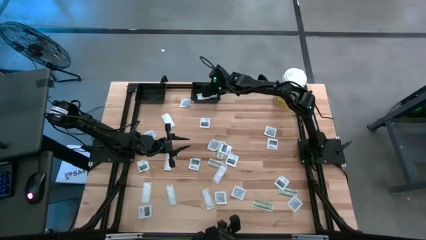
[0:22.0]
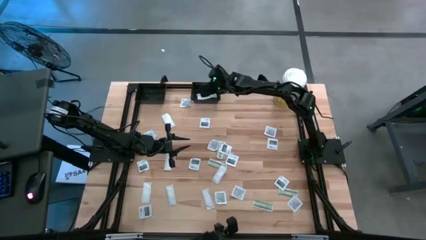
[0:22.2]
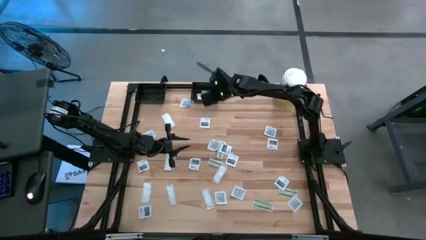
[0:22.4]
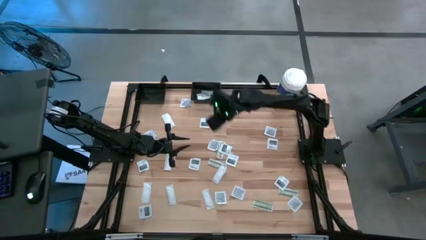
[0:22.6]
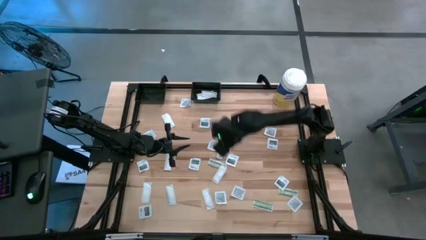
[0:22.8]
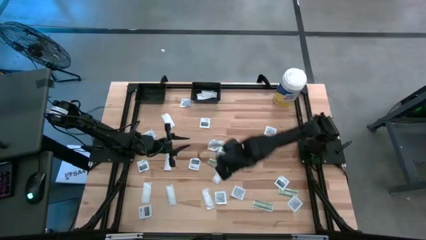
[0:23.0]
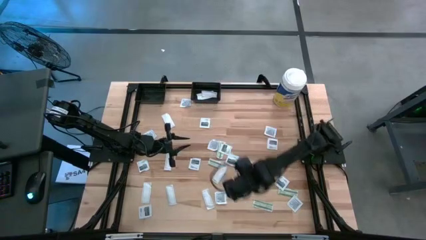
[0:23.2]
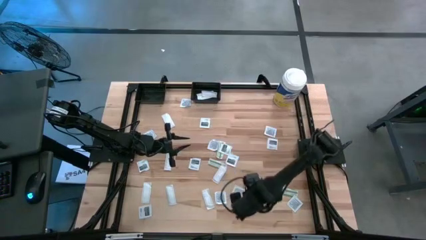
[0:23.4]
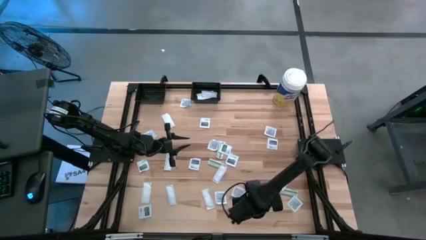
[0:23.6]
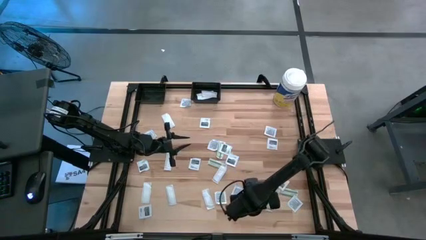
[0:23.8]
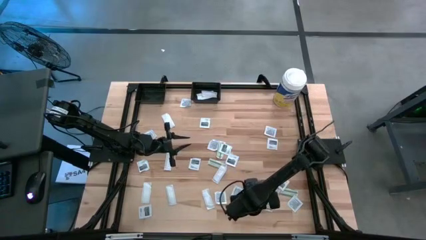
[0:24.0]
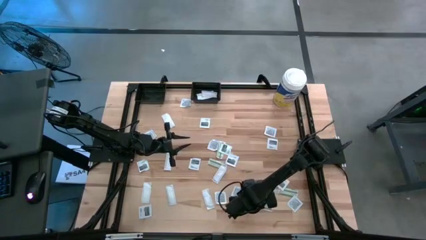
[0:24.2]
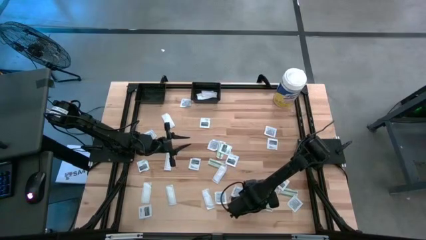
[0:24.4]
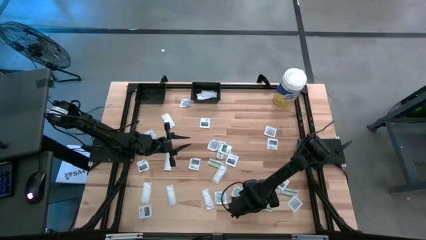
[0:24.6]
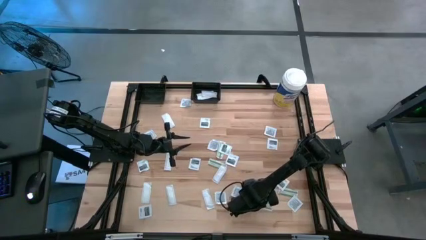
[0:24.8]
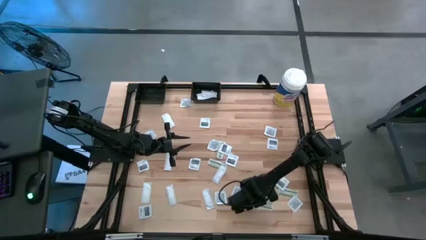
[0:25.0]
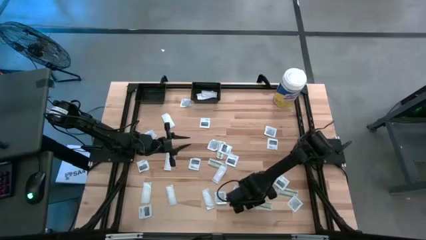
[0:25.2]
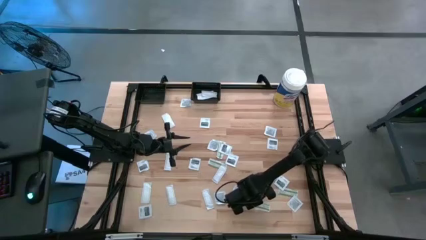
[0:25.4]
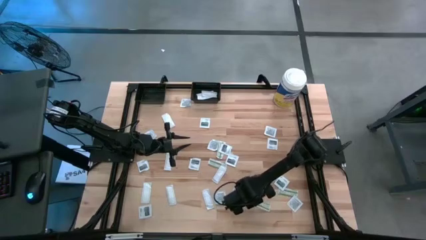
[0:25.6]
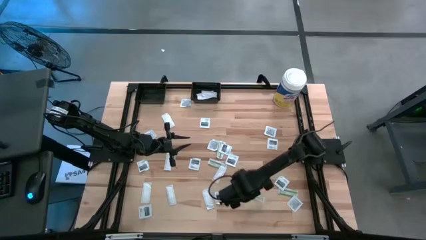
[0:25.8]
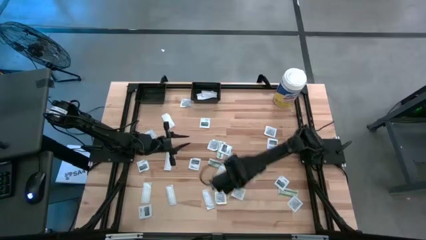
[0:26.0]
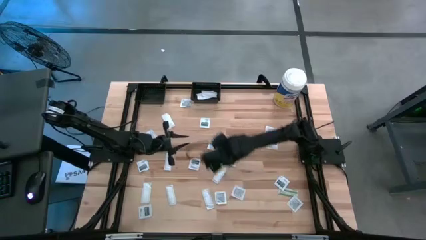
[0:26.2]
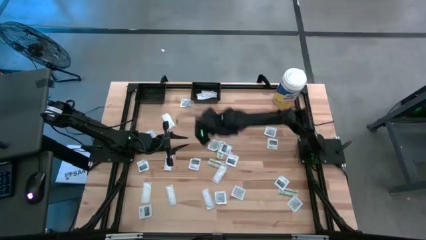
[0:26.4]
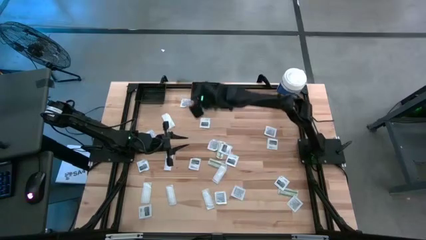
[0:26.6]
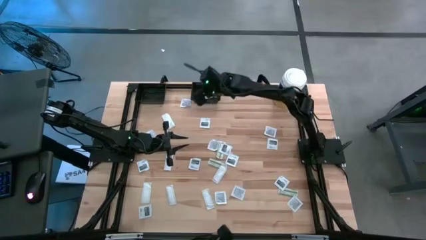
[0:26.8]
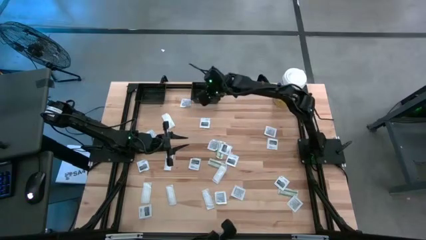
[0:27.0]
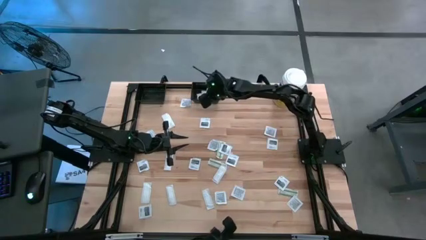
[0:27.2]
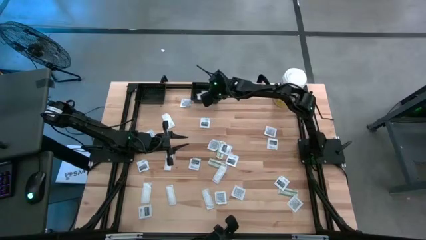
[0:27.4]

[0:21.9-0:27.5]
Task: Pick & Place First Aid Supplies
Put the green bandage pack into the right black bin

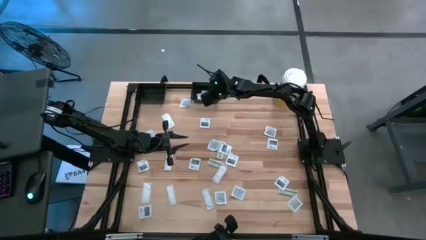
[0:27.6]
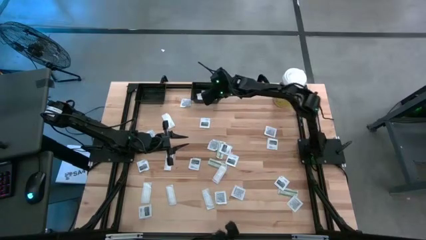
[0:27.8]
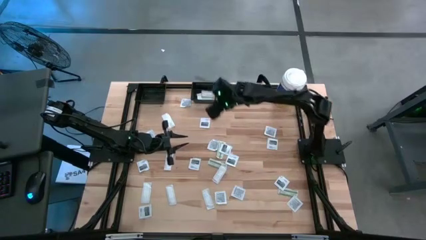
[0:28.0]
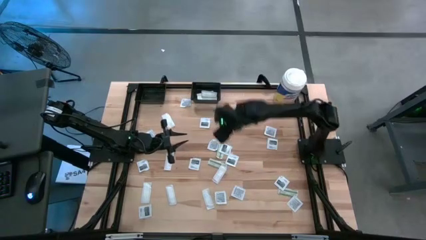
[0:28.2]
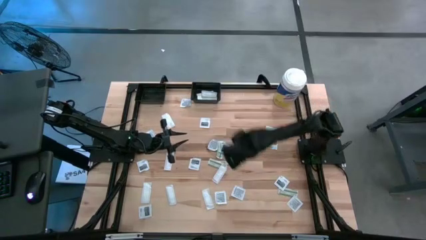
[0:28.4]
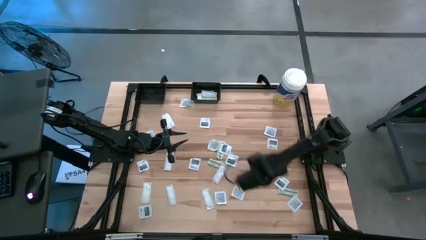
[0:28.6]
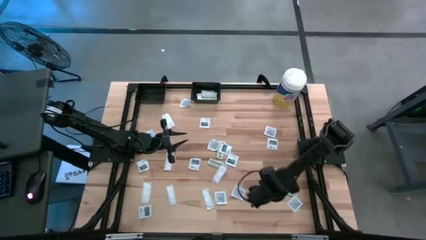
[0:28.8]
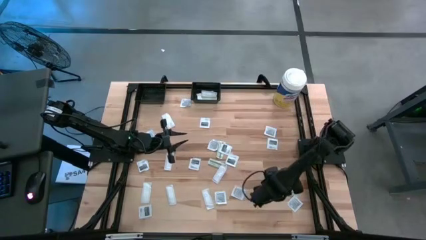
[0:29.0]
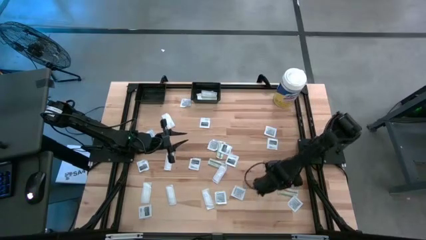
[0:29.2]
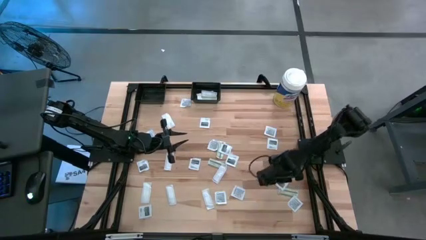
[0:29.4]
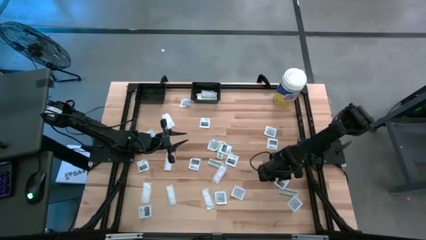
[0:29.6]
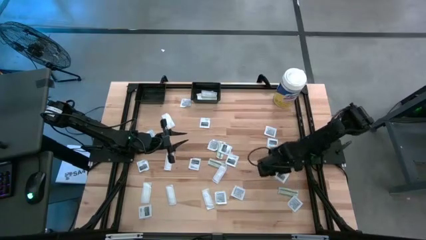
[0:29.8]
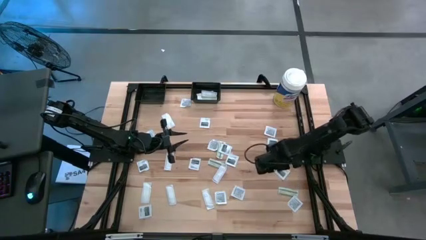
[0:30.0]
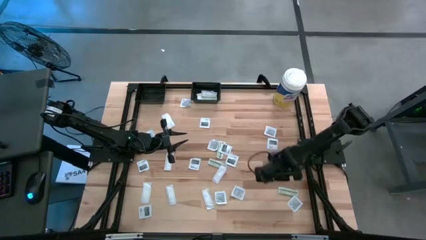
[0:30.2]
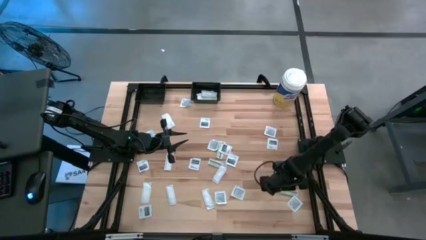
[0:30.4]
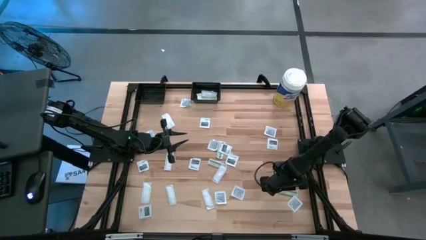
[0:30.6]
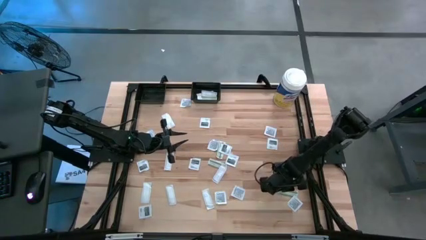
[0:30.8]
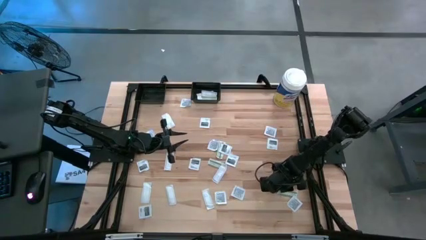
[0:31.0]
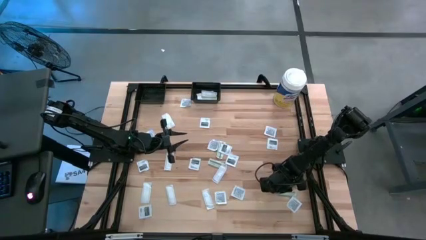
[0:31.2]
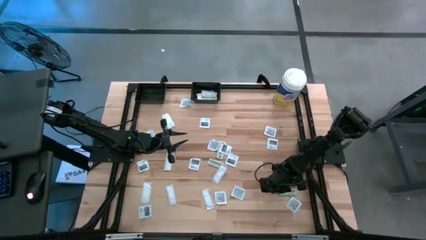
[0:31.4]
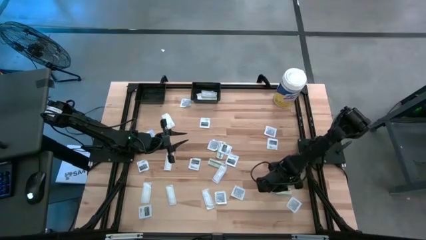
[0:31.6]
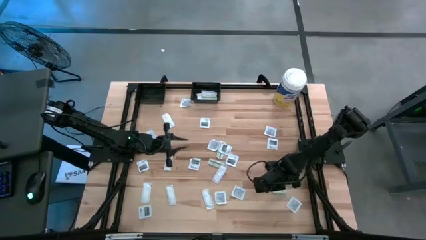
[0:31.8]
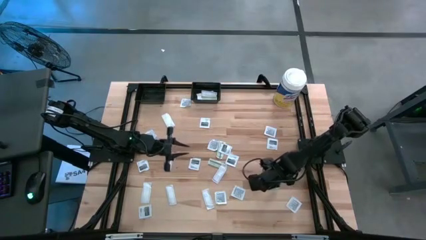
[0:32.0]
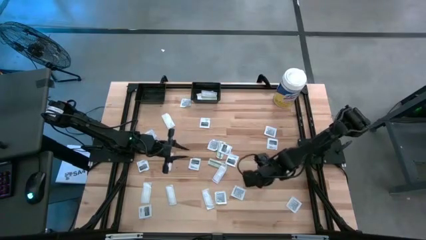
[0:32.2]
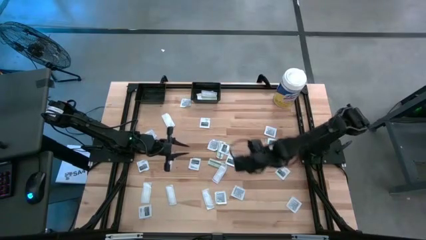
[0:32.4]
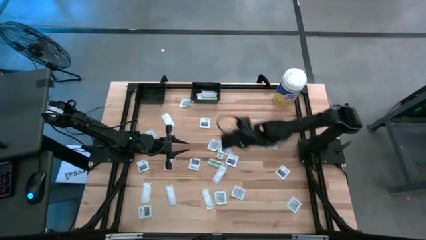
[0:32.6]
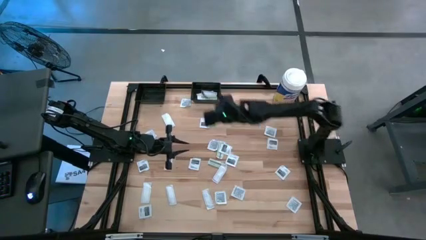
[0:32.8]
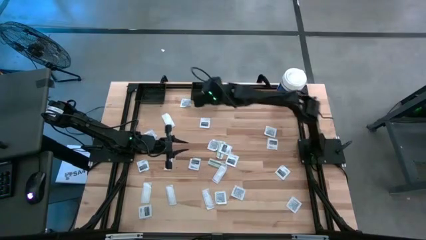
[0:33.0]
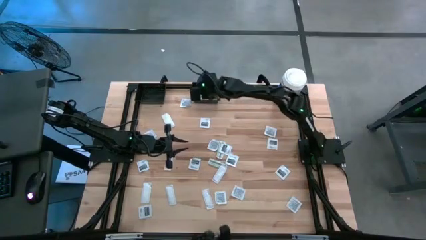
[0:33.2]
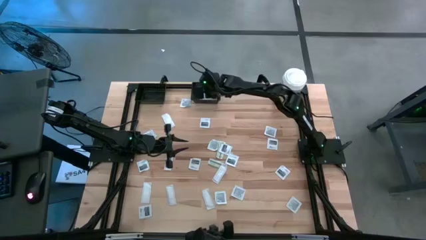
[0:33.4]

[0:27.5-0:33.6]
Put the green bandage pack into the right black bin

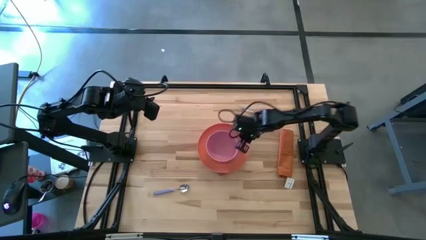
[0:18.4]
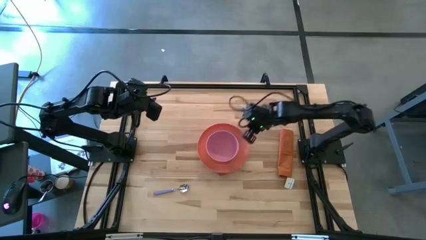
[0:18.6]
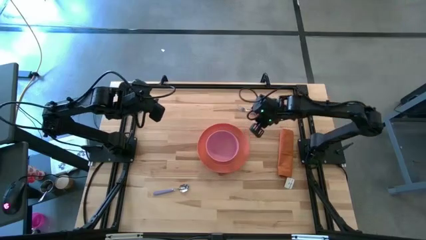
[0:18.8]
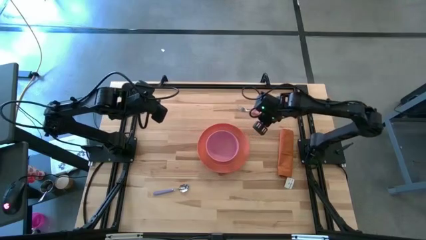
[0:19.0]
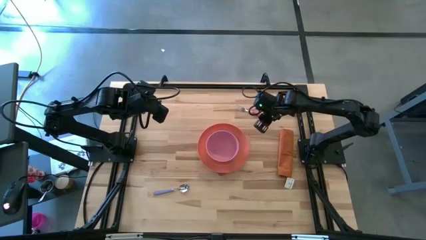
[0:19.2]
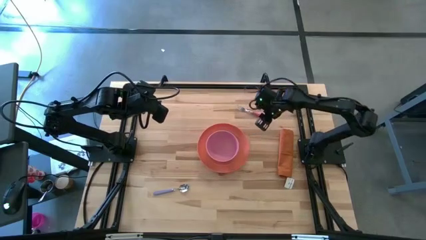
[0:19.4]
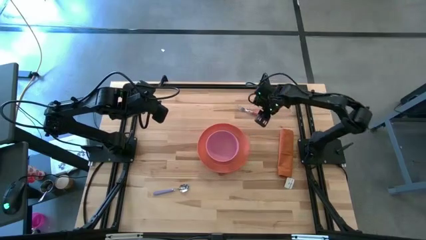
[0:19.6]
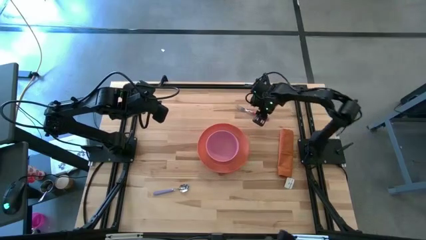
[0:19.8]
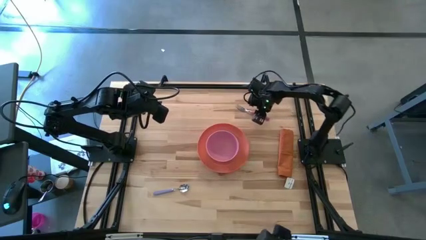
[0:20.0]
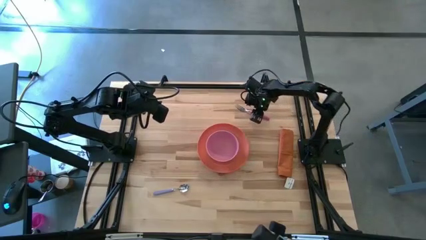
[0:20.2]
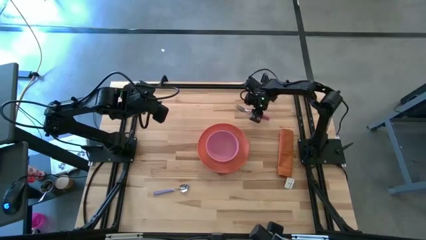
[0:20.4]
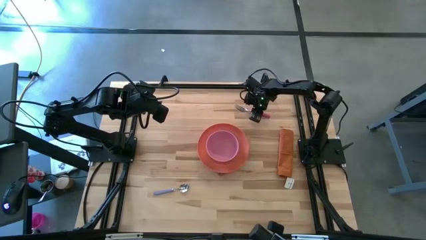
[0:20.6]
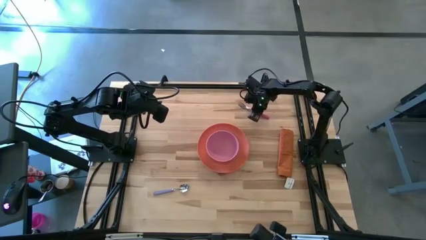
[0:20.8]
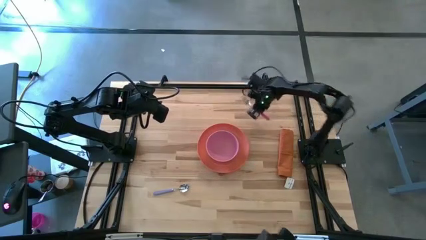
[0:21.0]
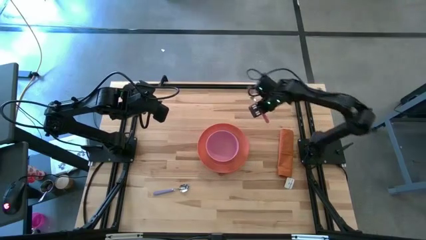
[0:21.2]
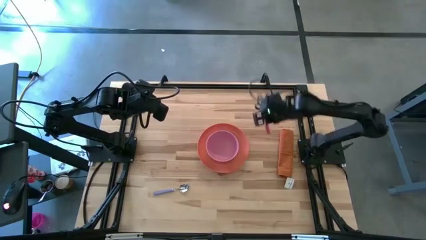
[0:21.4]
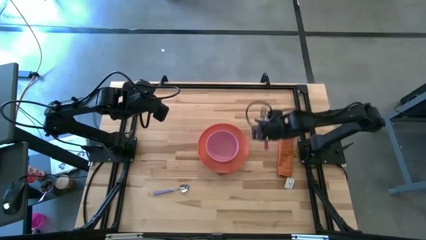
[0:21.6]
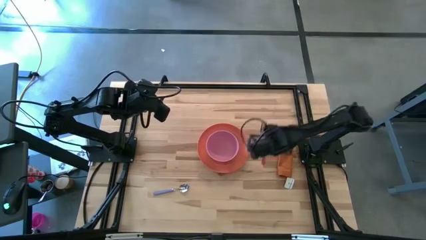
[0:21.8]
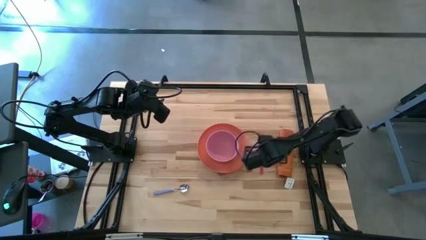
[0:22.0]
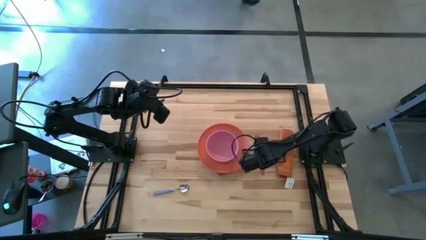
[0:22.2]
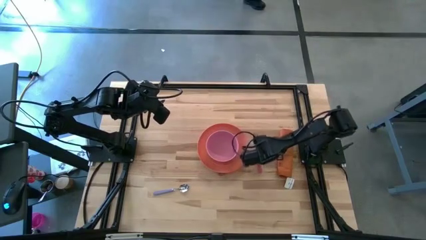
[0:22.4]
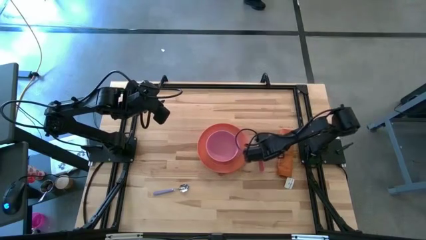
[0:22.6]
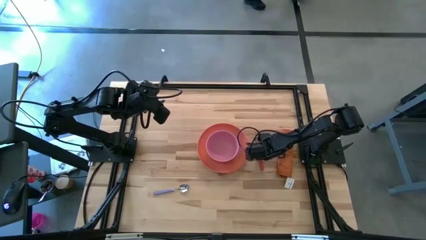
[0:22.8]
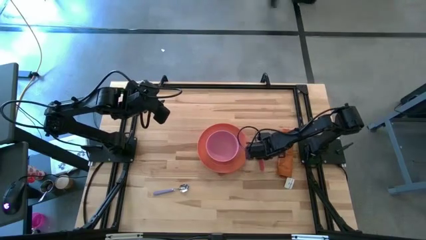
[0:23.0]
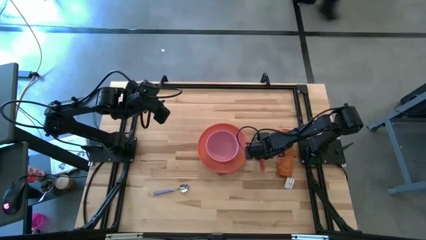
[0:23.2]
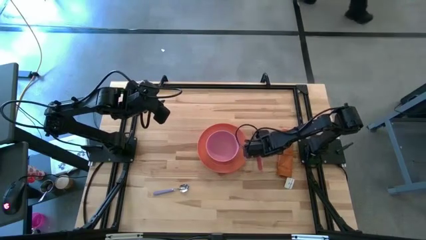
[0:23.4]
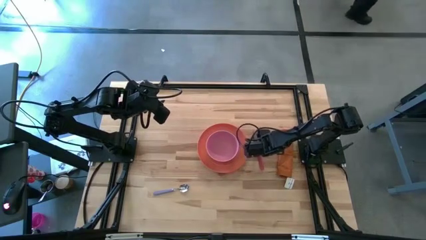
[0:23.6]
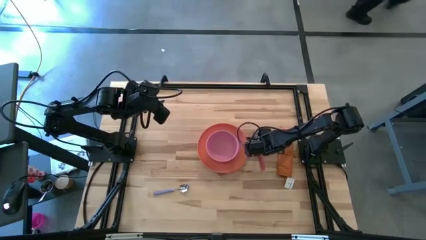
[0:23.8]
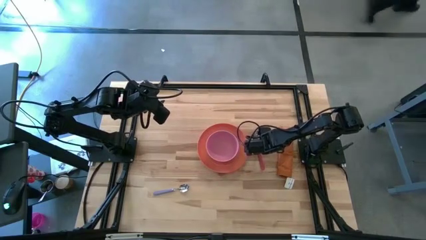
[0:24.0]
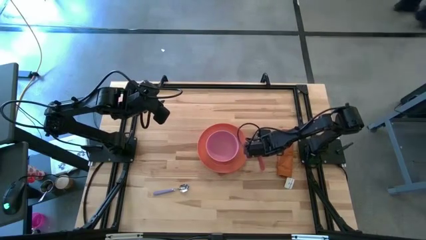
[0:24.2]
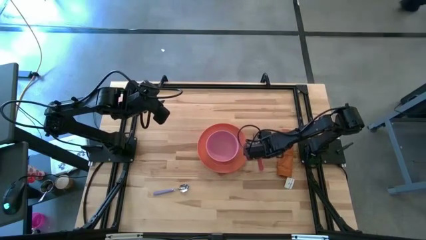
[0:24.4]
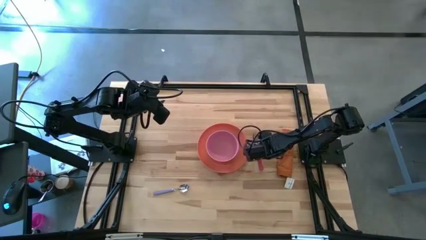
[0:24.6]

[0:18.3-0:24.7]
Task: Set table place
Put the fork to the right side of the plate
